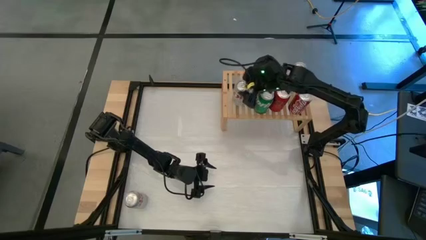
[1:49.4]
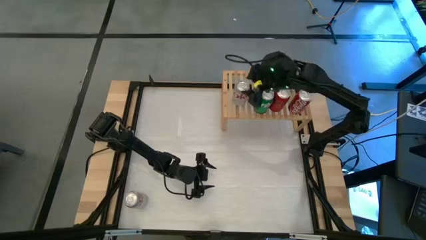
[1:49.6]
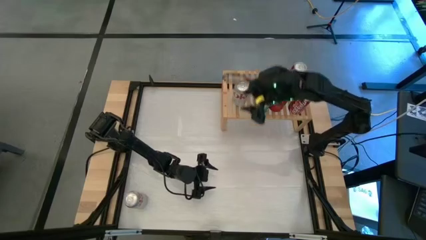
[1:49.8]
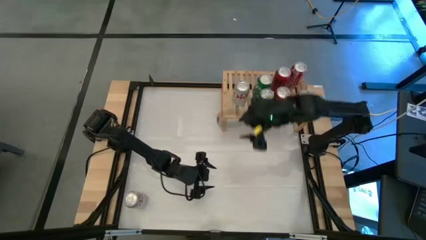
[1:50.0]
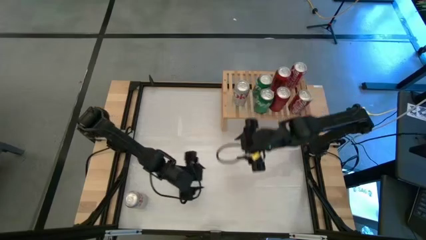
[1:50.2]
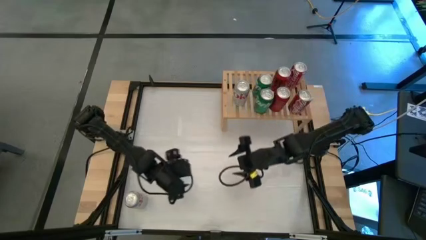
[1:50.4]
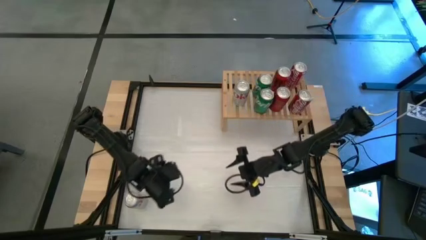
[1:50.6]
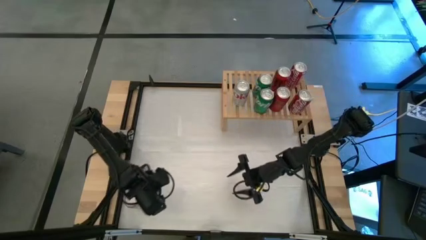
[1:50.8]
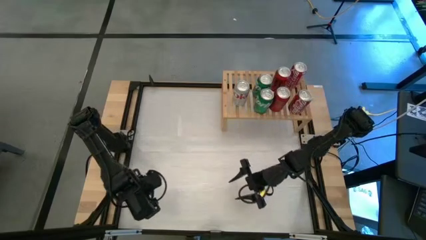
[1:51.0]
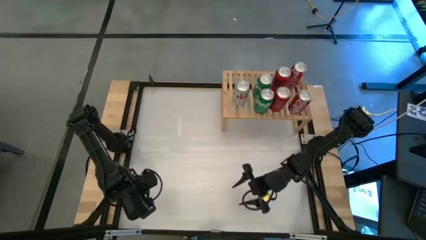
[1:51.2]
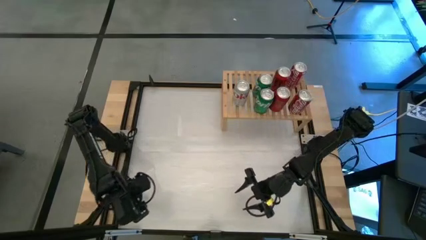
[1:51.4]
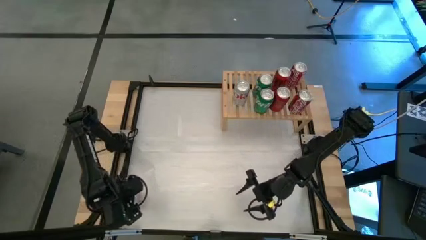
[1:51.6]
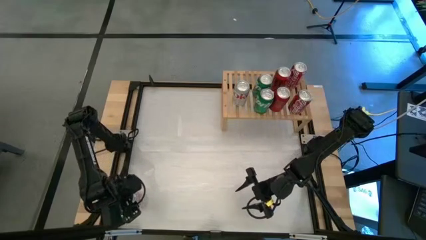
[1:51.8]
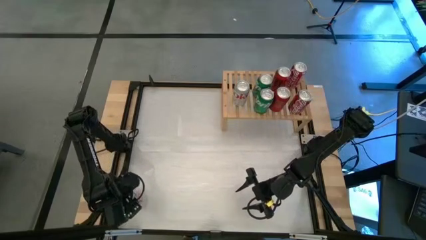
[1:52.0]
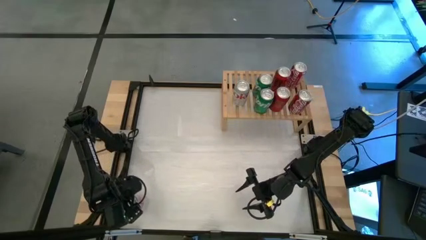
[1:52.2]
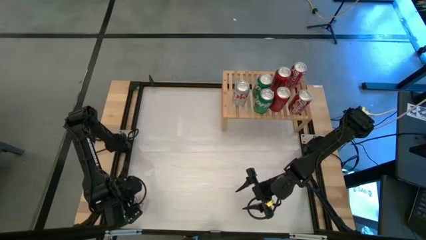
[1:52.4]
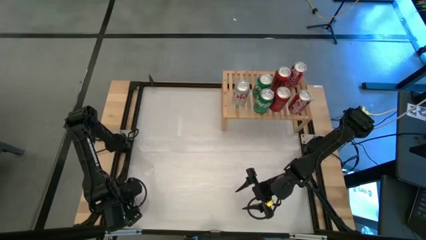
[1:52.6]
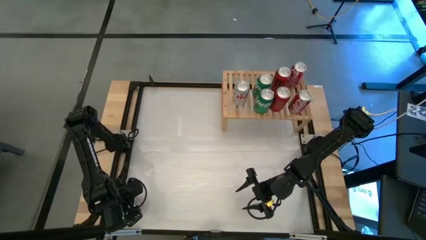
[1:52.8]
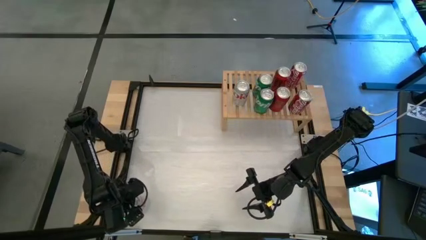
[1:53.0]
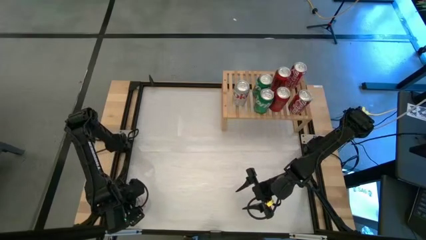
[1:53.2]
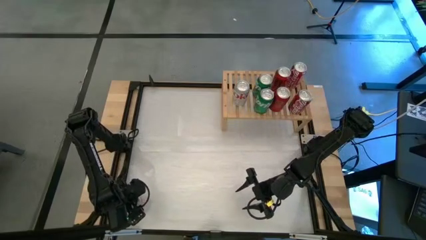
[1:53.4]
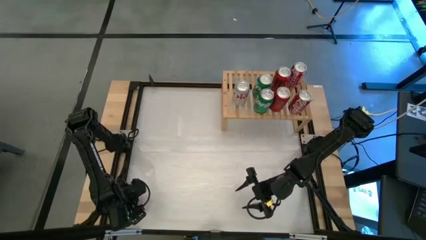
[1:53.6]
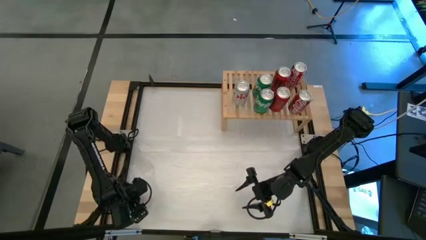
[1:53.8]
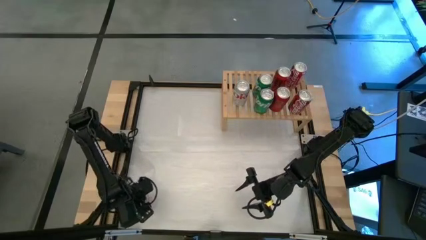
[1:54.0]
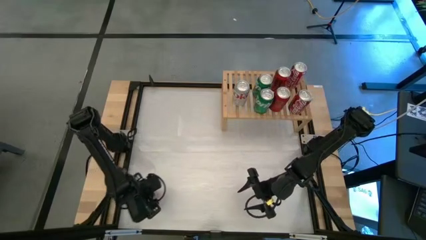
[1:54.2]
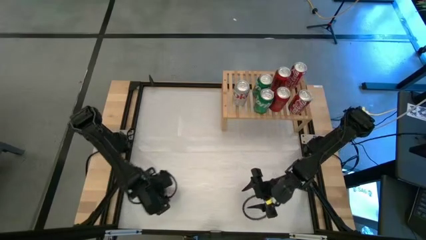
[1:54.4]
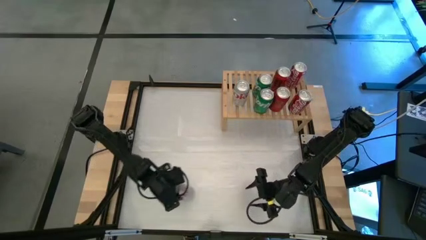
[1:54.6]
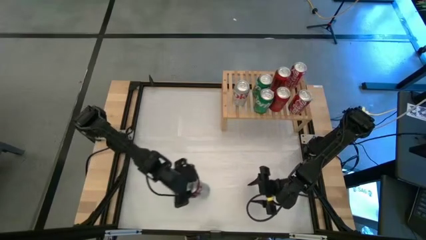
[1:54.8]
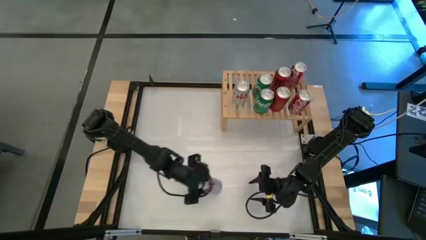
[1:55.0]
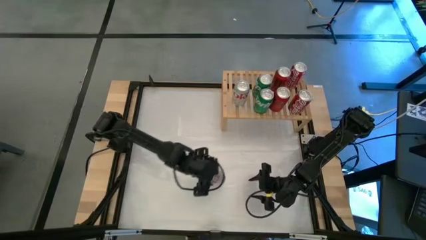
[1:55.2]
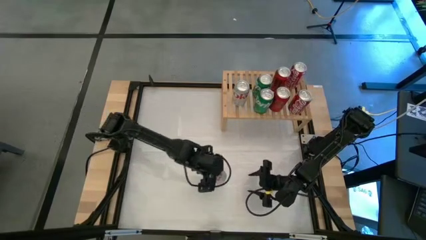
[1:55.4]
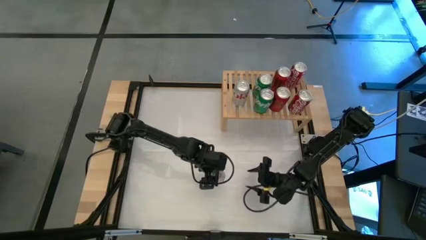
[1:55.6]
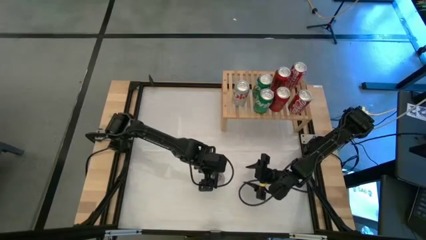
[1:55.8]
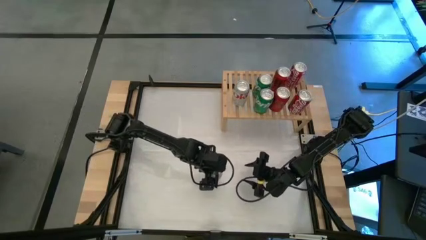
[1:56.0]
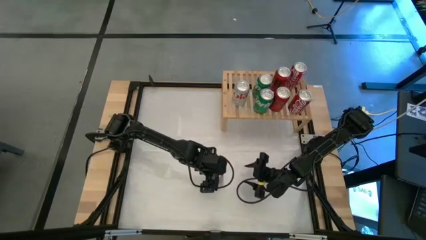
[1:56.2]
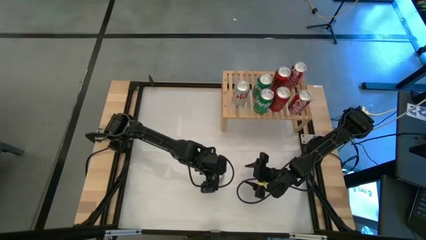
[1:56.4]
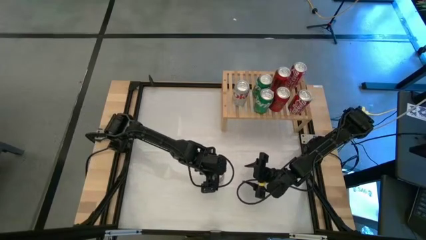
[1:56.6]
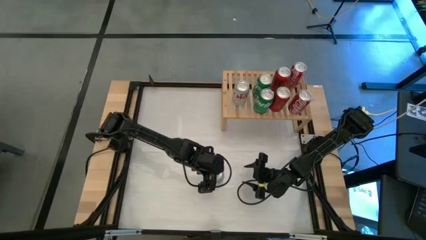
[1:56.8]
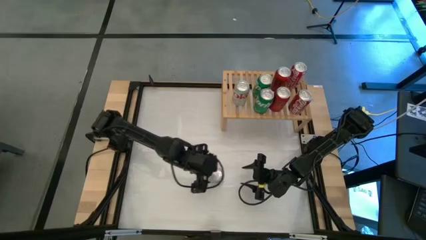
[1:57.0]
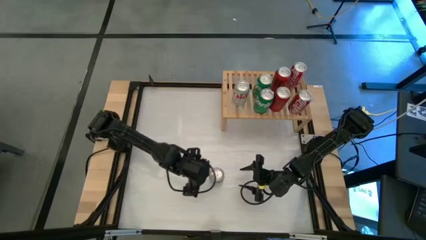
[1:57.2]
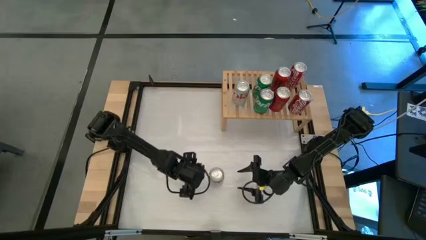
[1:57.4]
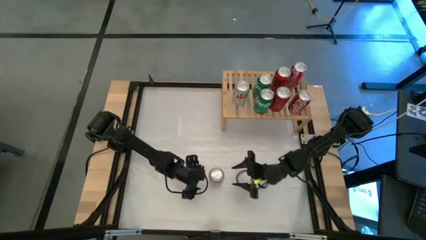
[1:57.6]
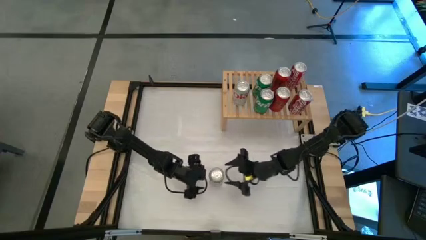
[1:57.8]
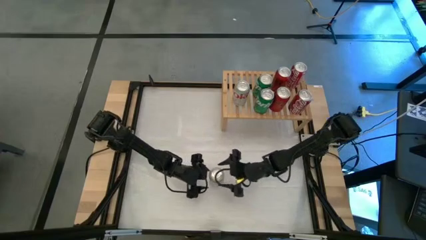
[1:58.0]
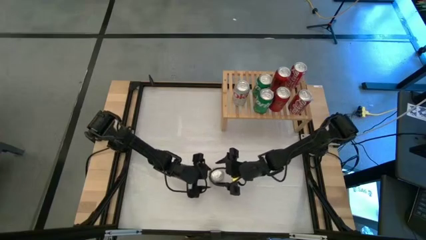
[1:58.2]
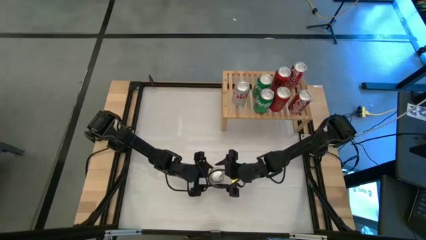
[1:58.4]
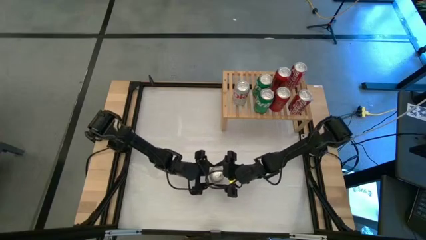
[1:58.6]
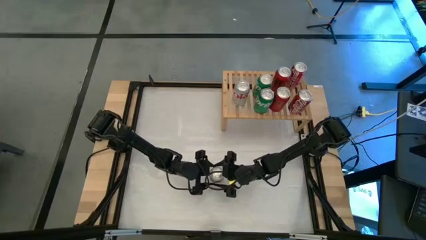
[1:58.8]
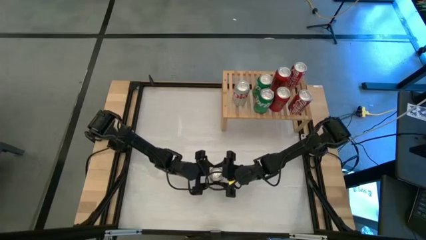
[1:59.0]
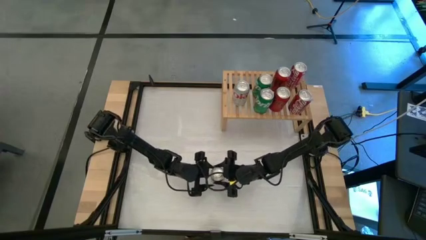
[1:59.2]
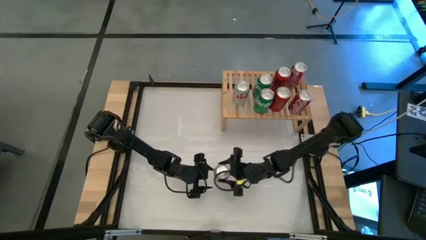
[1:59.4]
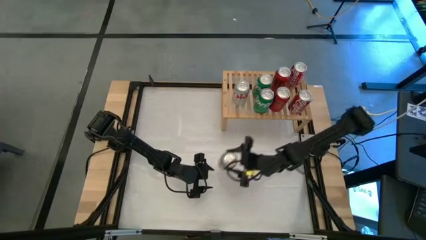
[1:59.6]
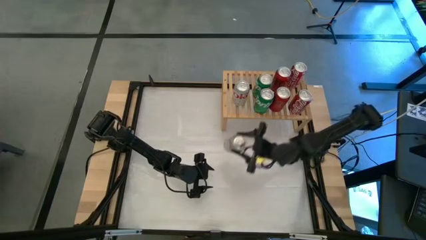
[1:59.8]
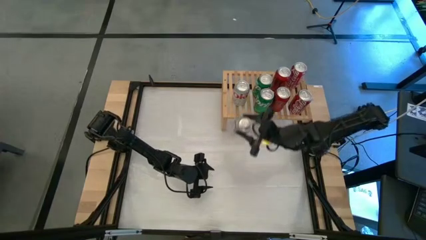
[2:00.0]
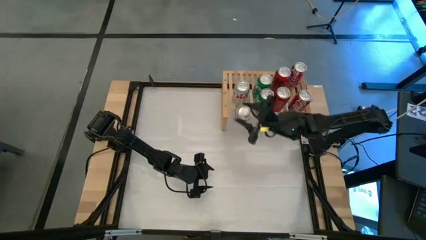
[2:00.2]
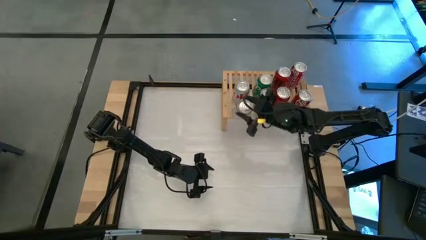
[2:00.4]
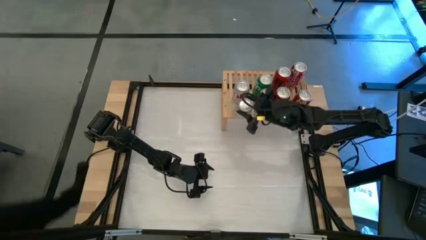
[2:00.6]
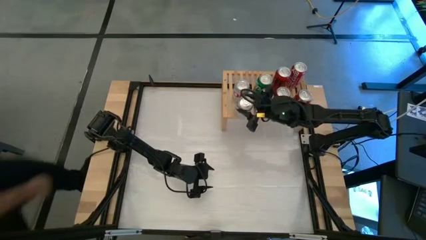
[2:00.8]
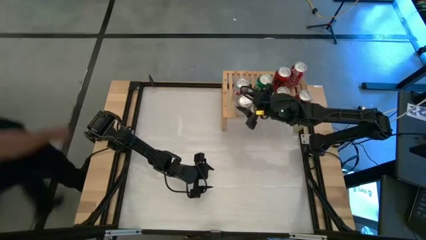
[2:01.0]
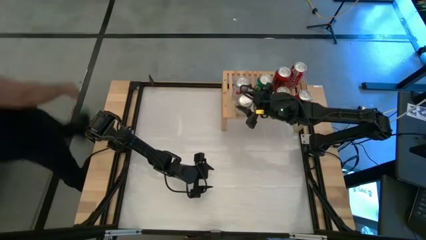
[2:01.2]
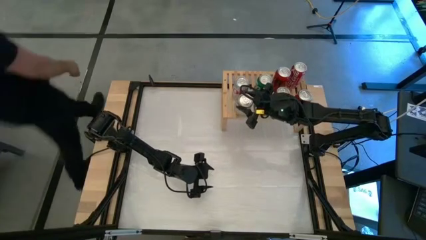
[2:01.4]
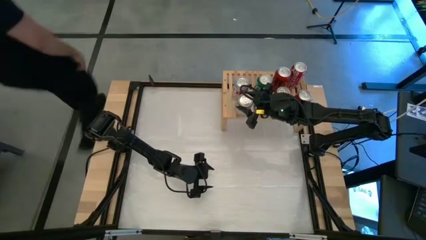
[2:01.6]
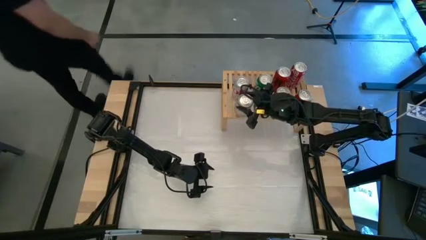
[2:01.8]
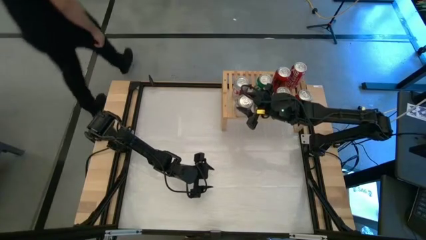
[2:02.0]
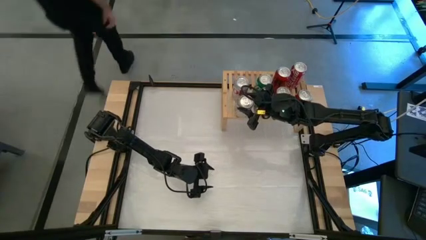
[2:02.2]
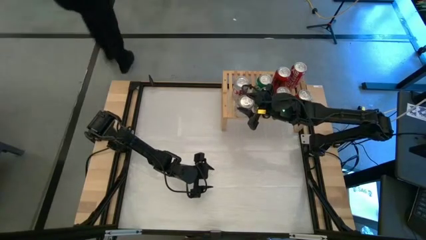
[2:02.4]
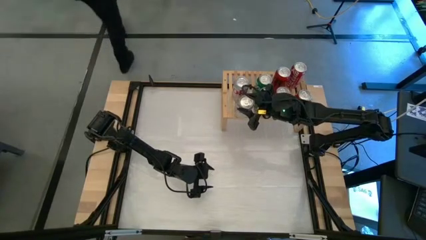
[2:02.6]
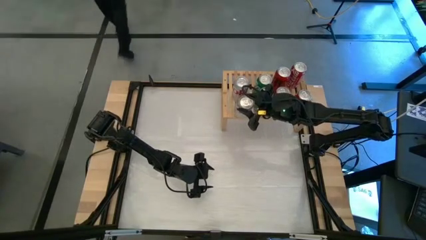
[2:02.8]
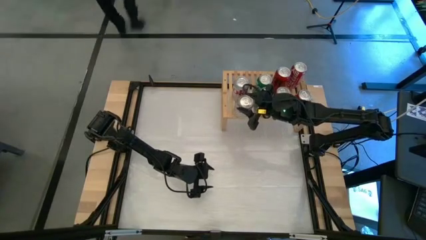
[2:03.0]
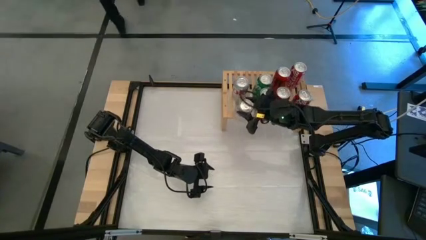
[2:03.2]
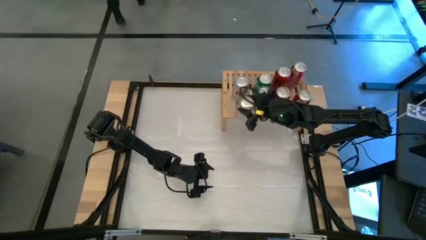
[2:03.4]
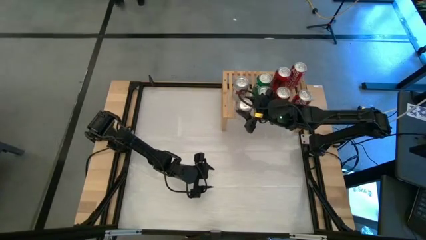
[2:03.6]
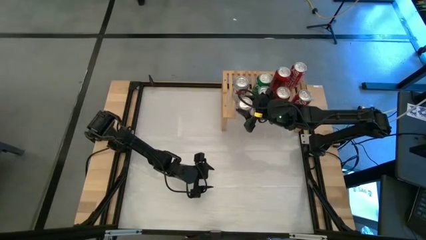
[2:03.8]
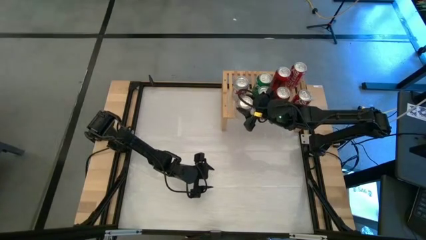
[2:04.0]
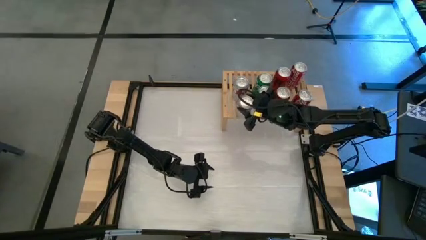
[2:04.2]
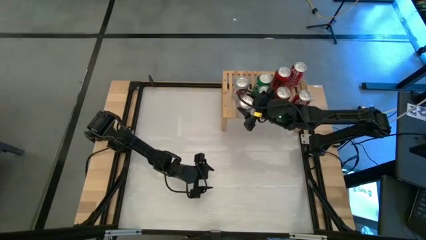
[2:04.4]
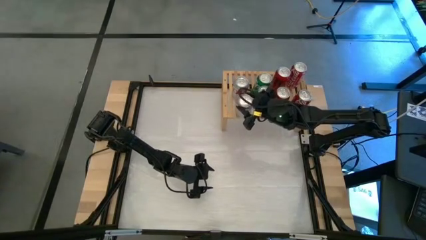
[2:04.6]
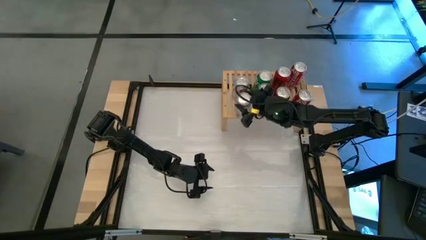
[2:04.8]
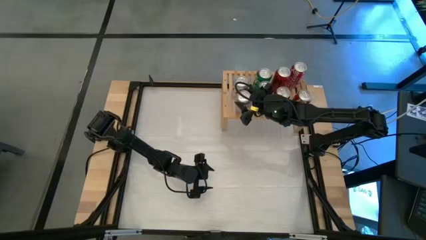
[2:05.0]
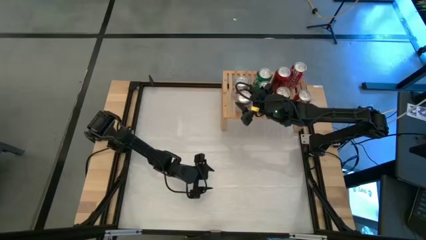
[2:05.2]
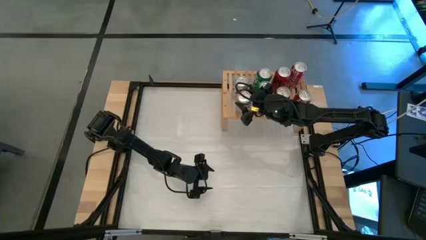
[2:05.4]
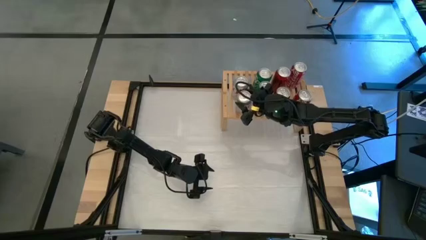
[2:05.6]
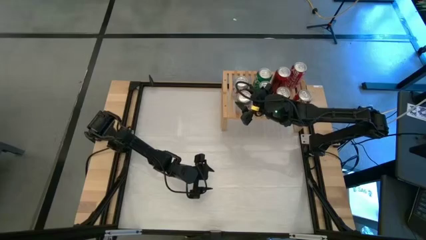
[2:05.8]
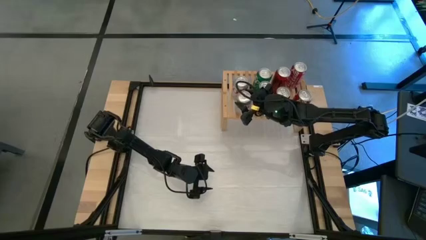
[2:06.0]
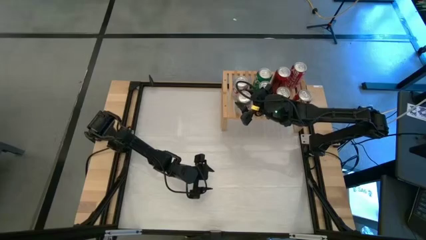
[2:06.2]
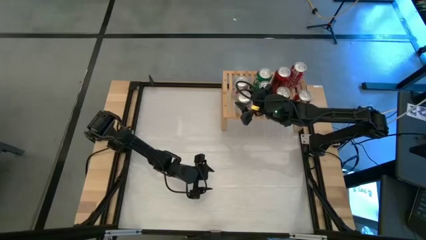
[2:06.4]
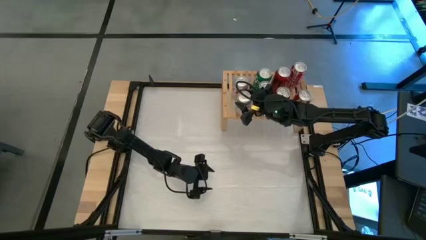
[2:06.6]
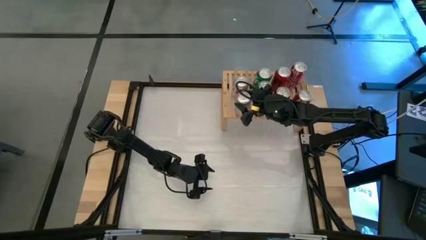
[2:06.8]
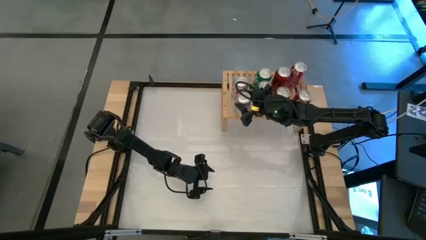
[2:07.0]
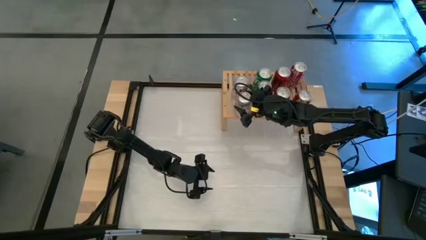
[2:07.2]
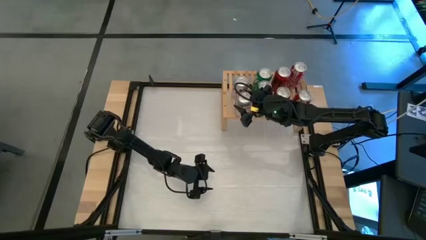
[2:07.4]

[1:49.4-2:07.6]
Task: Place canned beverage on shelf
Put the silver soda can on the shelf aligned with the other silver soda can
